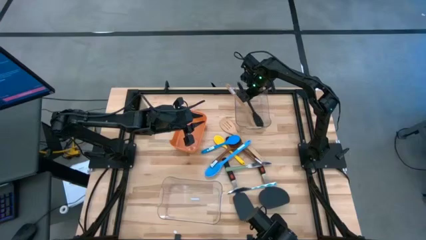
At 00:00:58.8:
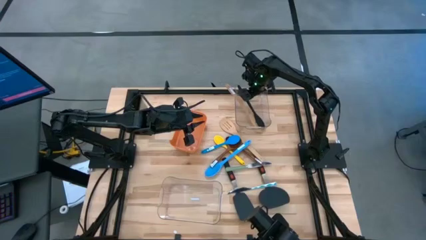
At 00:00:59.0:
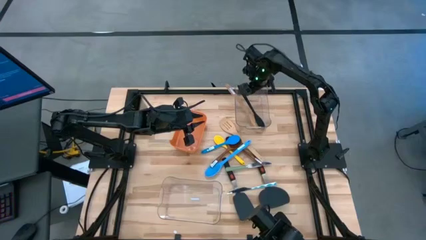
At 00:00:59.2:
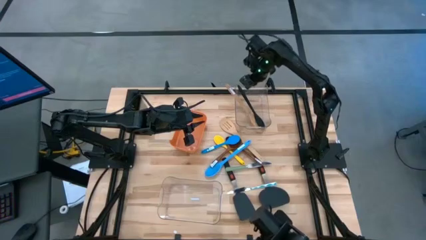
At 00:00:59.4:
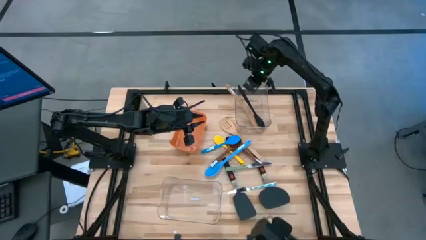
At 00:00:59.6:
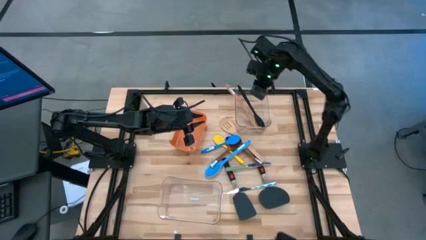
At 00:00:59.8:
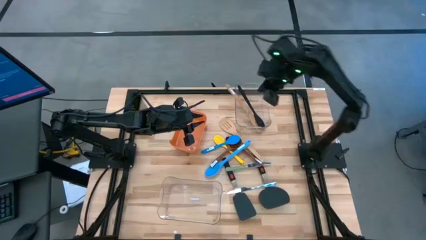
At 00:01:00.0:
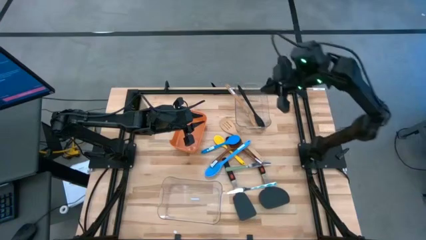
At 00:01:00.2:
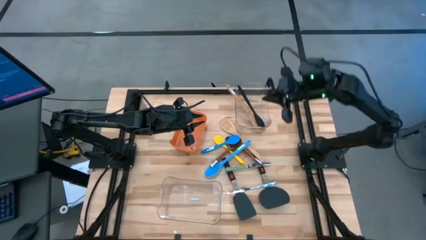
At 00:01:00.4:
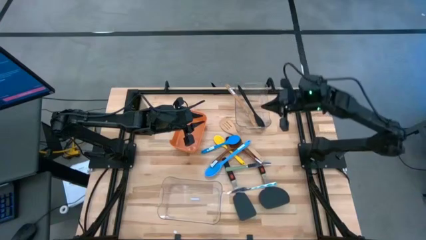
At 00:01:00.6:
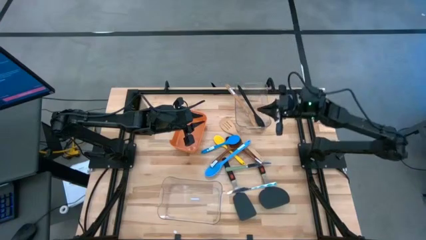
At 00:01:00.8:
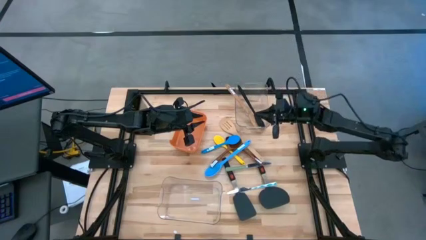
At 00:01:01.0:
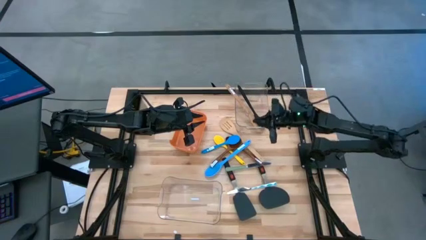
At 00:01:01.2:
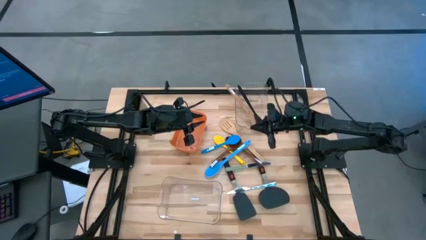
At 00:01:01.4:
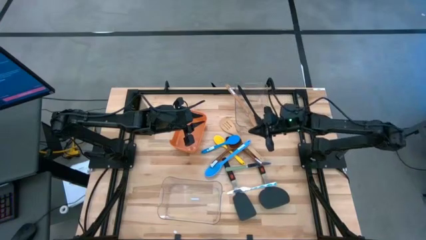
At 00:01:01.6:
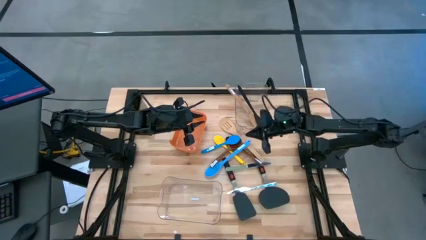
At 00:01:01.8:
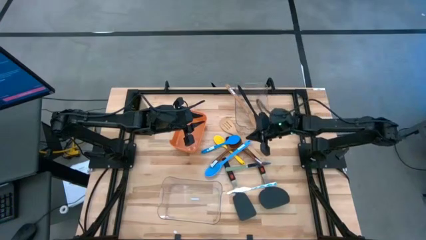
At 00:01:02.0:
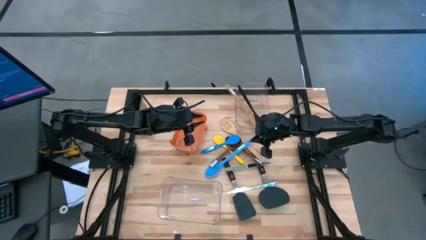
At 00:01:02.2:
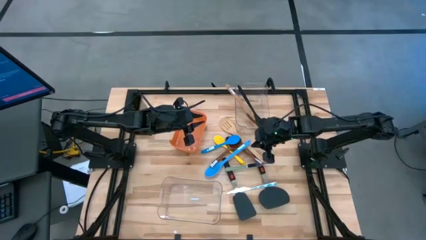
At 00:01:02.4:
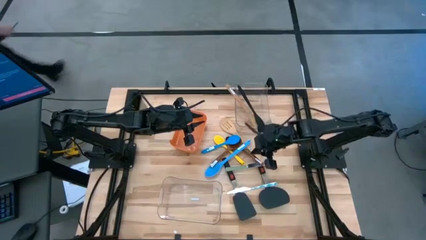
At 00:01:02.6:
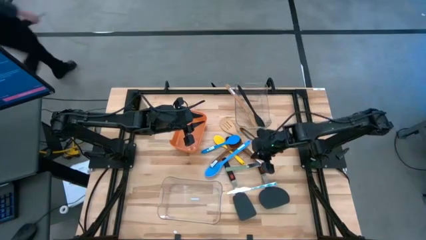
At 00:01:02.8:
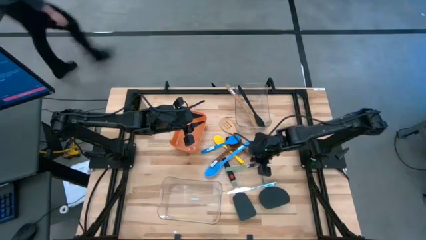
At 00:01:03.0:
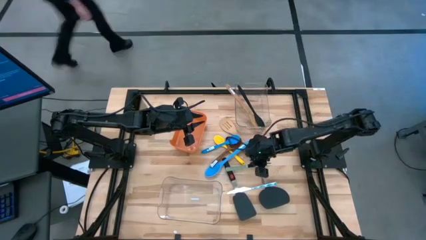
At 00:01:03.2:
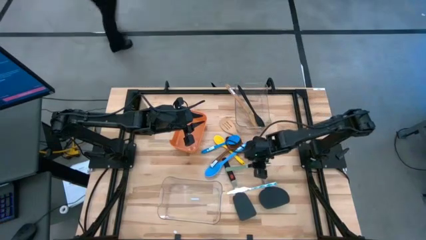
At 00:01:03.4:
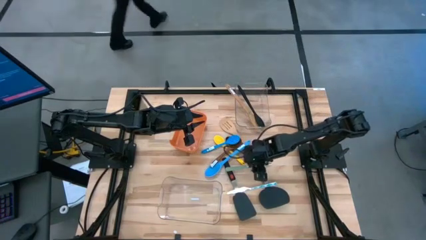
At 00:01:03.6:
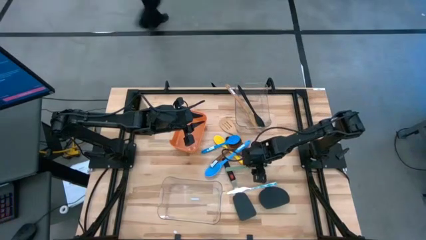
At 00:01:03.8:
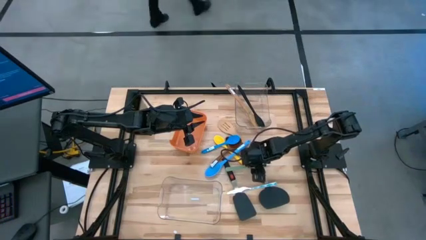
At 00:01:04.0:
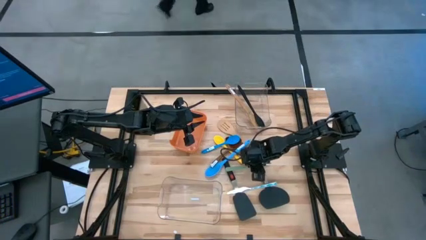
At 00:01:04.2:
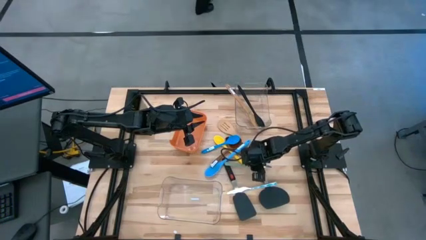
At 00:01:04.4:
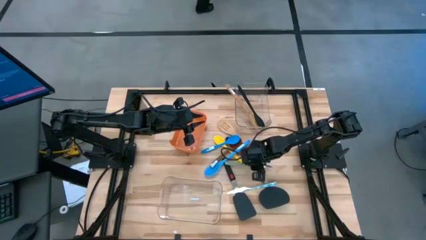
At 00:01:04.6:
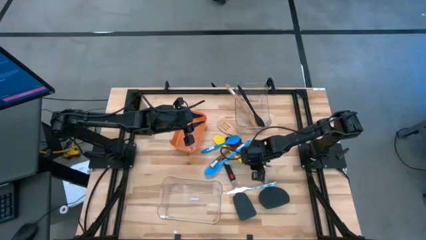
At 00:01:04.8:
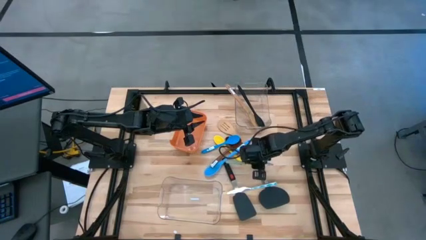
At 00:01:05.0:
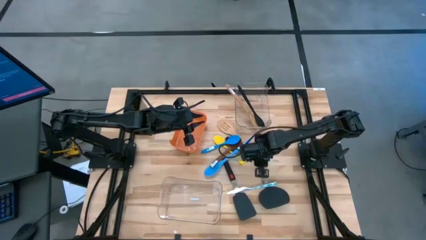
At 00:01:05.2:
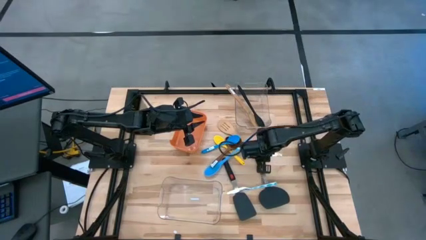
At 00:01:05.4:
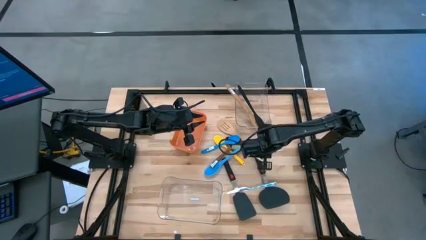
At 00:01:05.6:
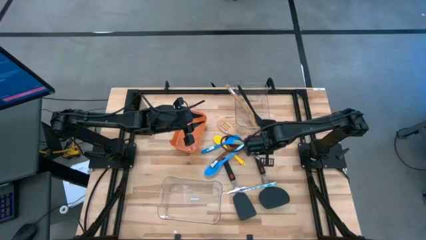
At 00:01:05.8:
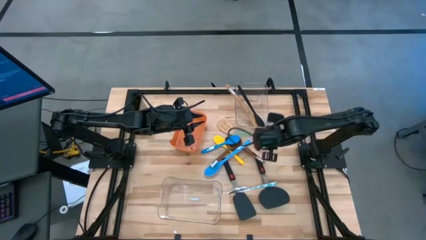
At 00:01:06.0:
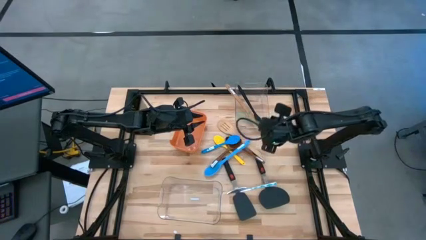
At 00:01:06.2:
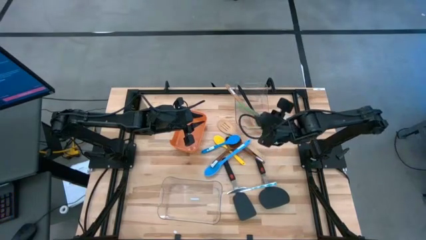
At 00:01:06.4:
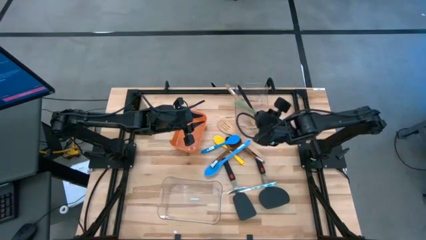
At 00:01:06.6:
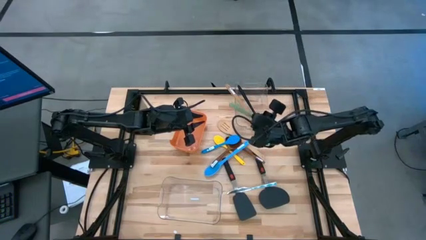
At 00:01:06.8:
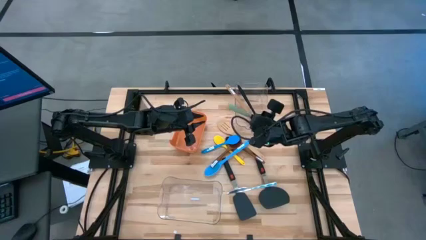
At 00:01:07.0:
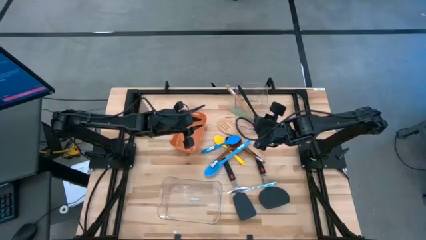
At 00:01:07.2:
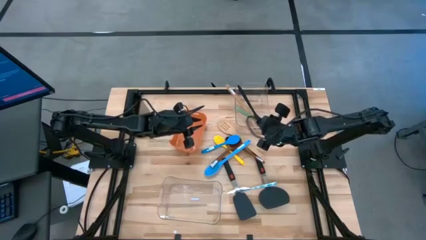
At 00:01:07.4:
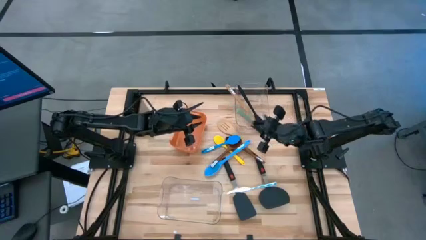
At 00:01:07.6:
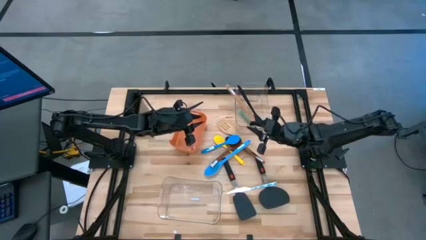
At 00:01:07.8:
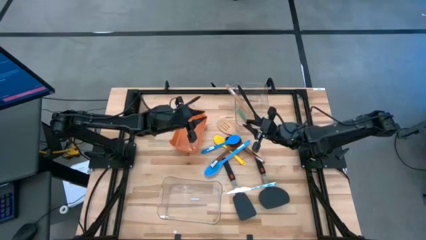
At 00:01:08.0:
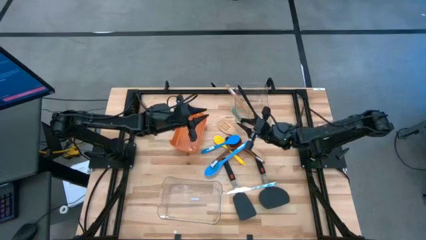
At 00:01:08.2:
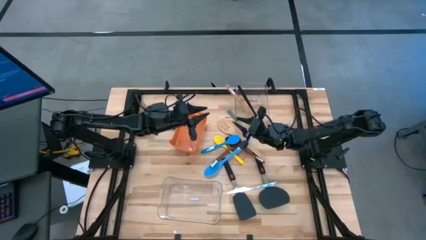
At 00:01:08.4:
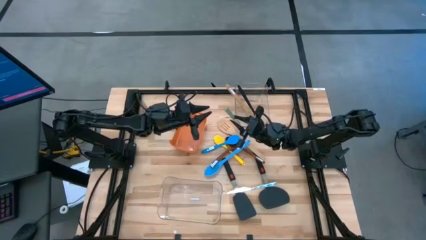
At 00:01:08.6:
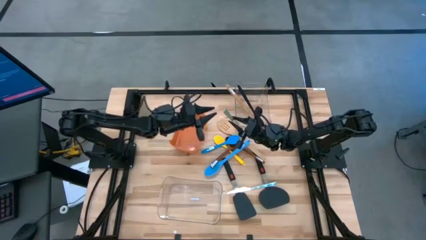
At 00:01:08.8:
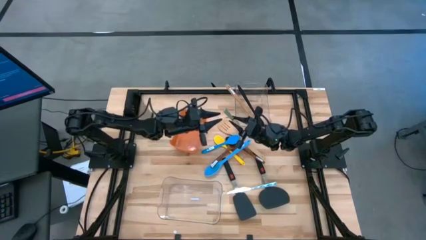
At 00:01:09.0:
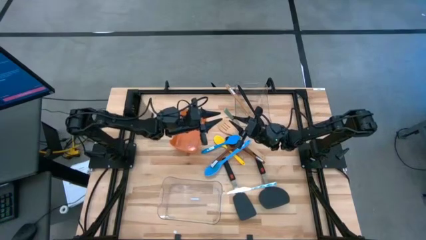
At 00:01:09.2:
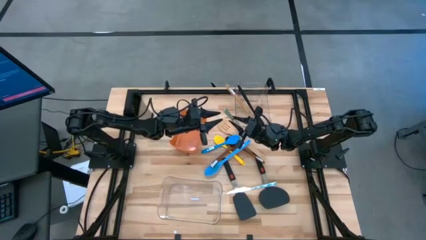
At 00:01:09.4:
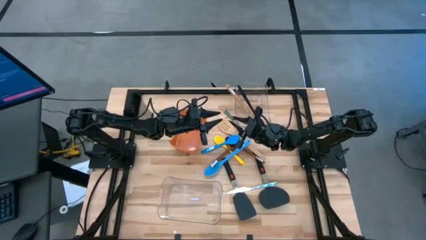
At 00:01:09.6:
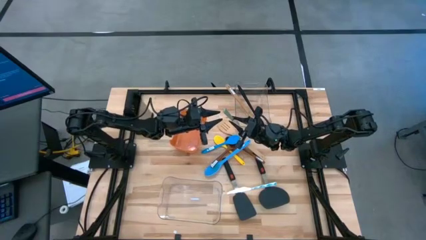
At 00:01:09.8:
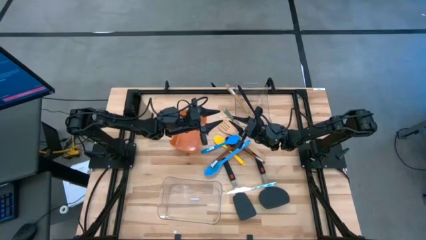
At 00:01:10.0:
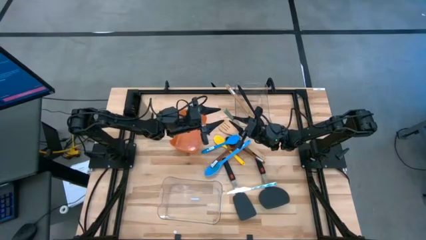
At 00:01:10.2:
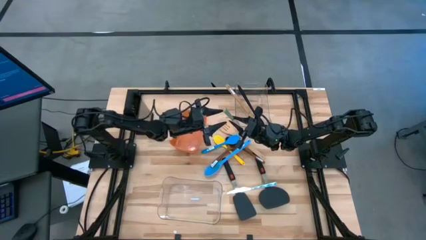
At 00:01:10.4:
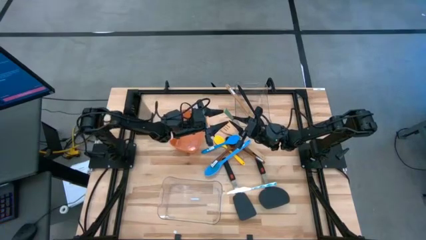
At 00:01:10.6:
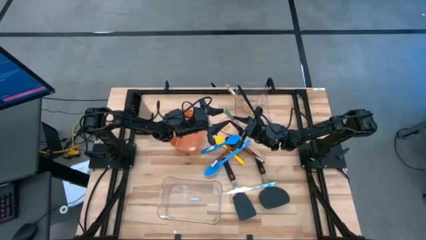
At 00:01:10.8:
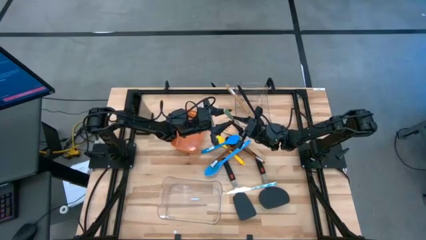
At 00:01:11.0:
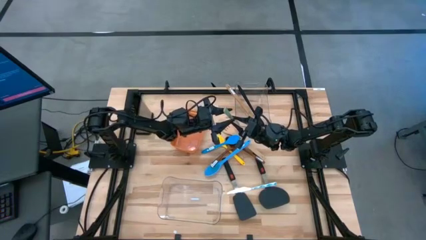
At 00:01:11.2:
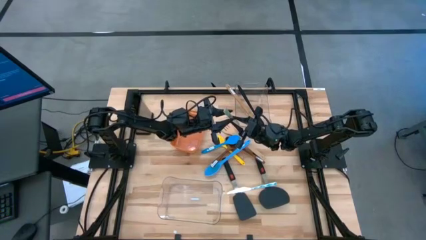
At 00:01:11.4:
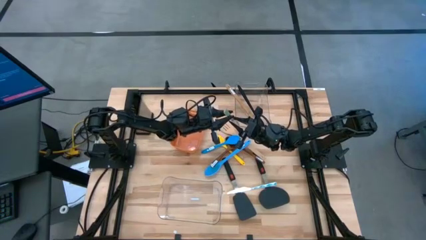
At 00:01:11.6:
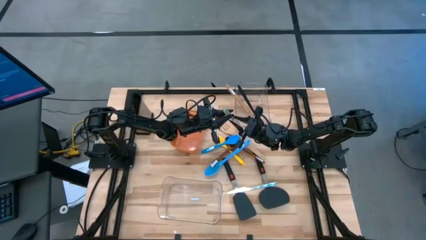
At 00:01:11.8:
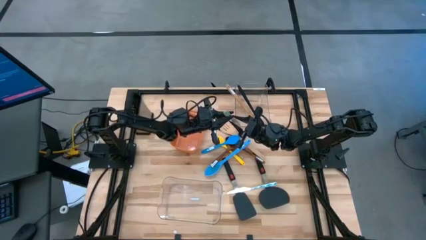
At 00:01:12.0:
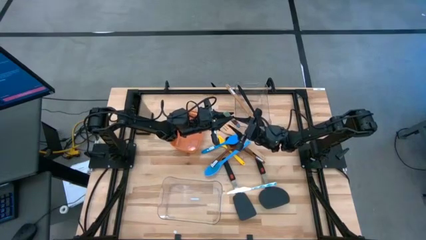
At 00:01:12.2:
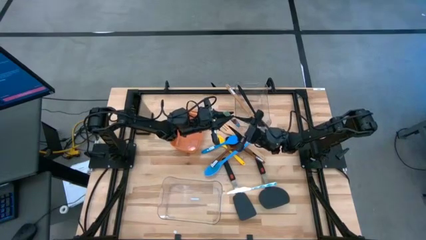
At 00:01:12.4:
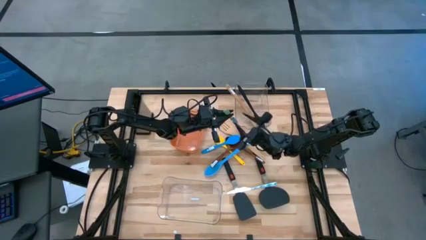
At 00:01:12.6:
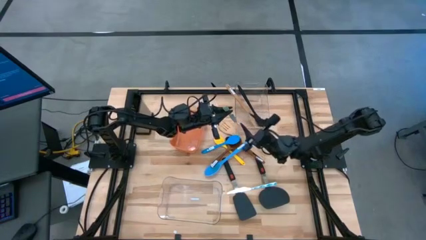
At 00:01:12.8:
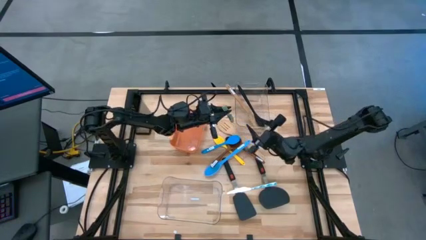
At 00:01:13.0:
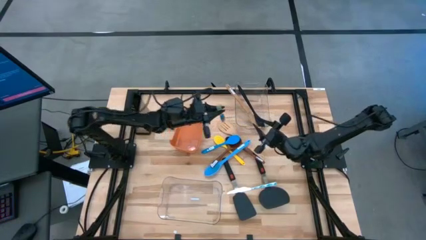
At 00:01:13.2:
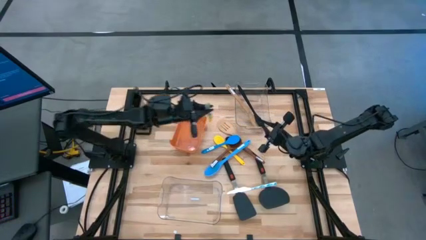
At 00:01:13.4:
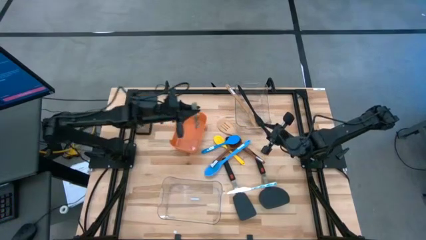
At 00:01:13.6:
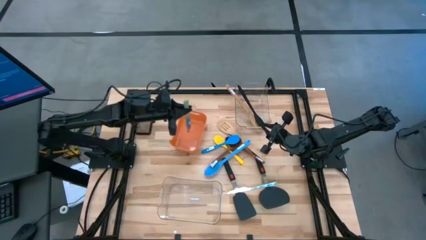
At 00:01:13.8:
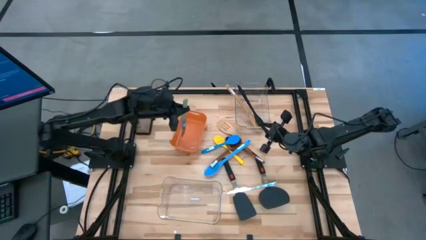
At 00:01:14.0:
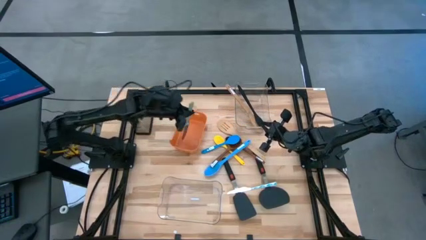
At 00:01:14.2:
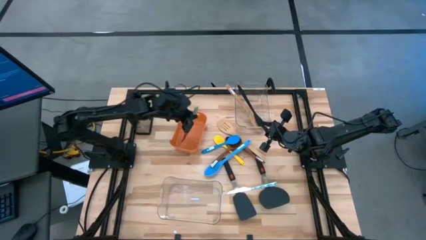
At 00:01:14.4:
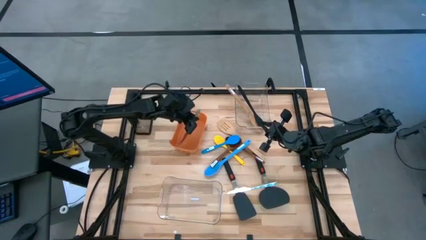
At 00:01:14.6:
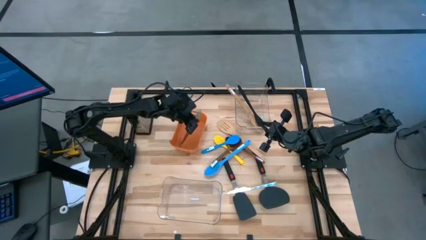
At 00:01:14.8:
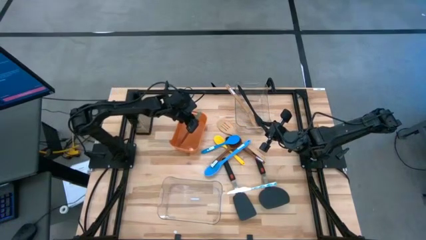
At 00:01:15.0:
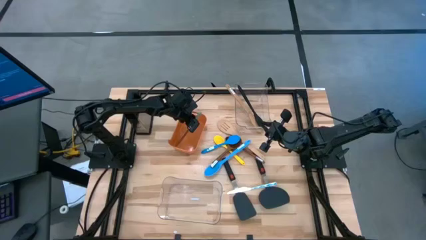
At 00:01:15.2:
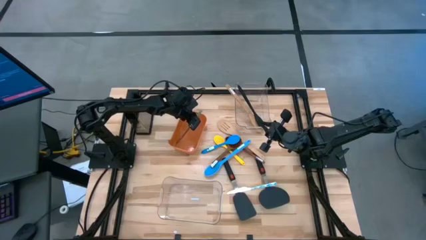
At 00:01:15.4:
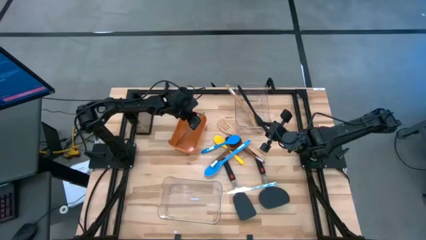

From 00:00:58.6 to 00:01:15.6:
Task: Pick & Place Kitchen Items
Put the green table knife into the orange bin
